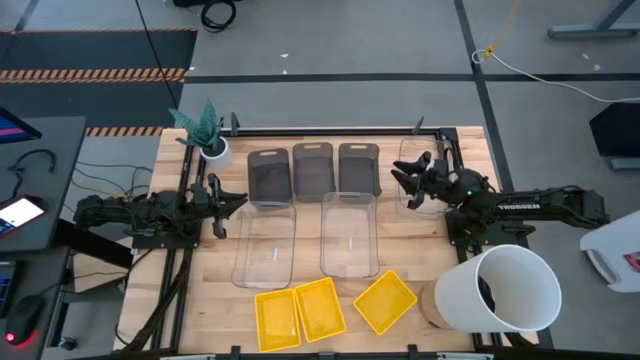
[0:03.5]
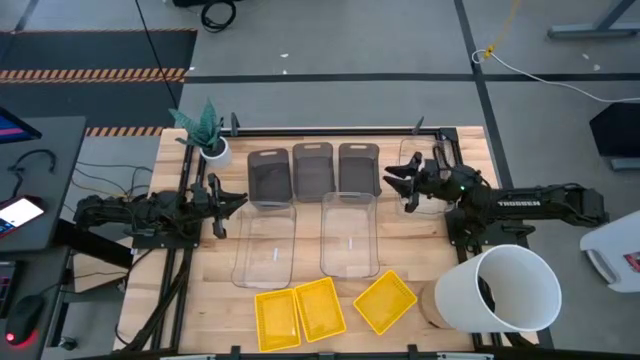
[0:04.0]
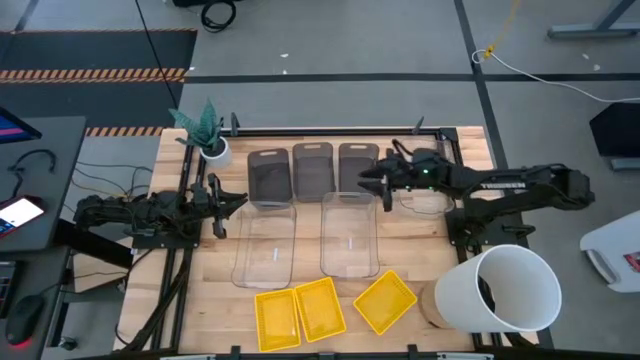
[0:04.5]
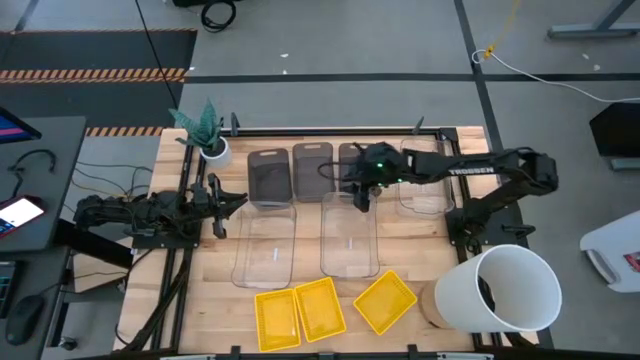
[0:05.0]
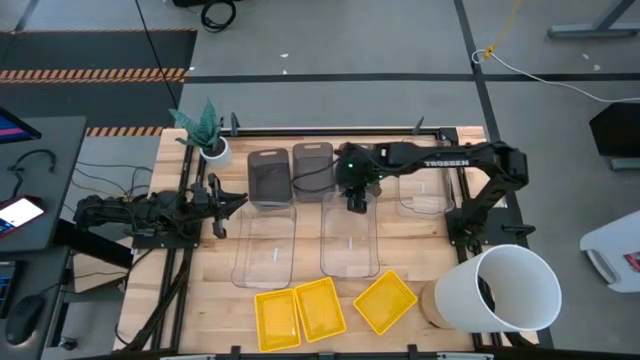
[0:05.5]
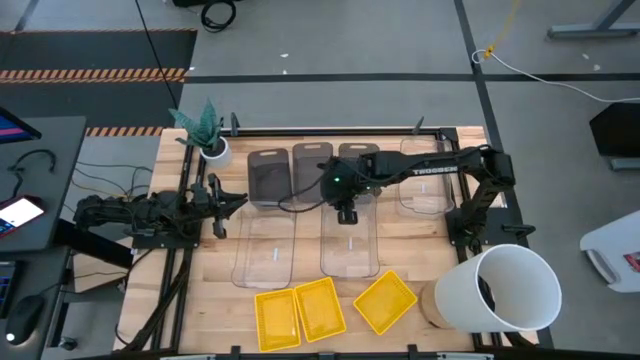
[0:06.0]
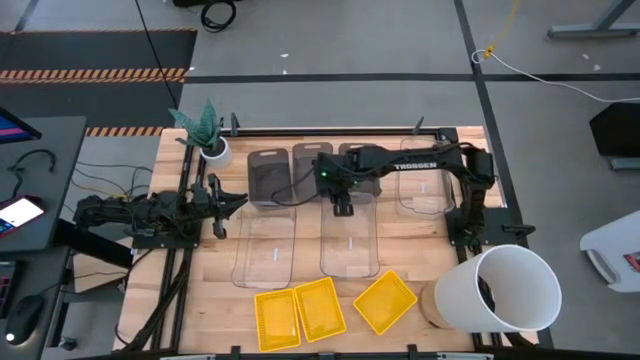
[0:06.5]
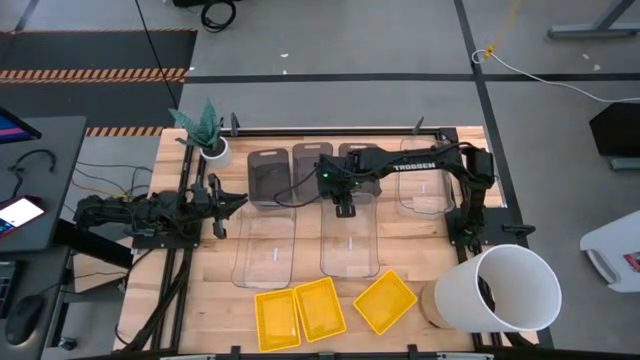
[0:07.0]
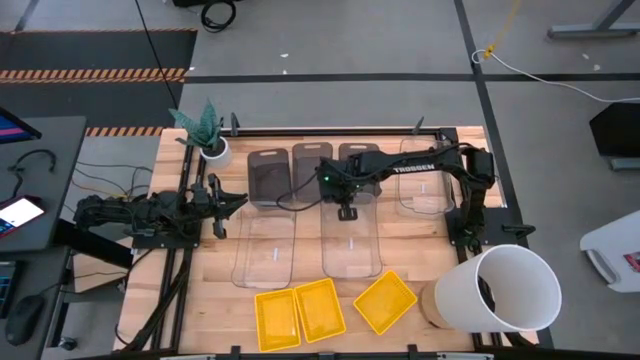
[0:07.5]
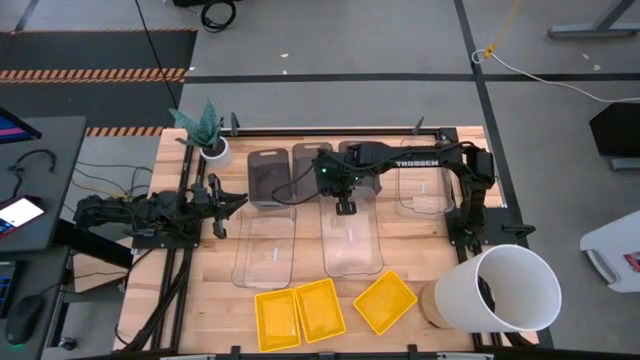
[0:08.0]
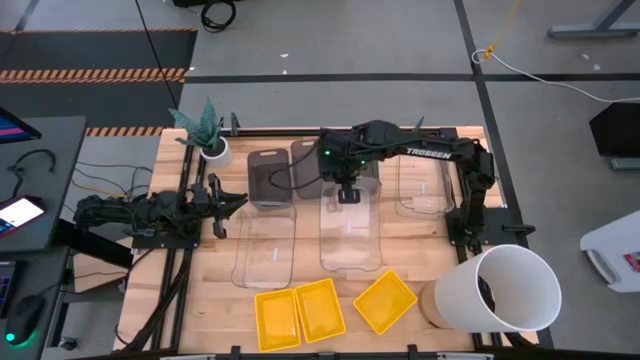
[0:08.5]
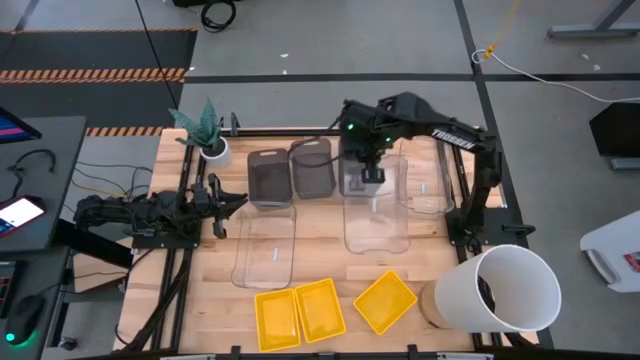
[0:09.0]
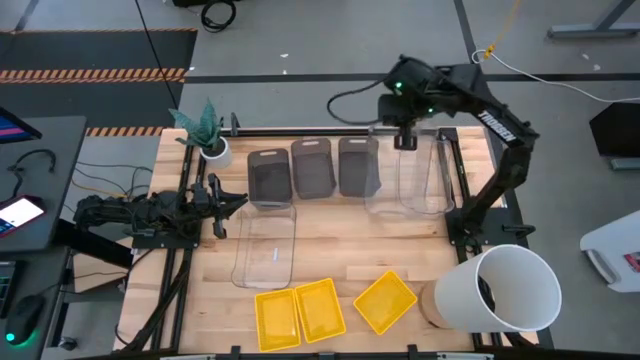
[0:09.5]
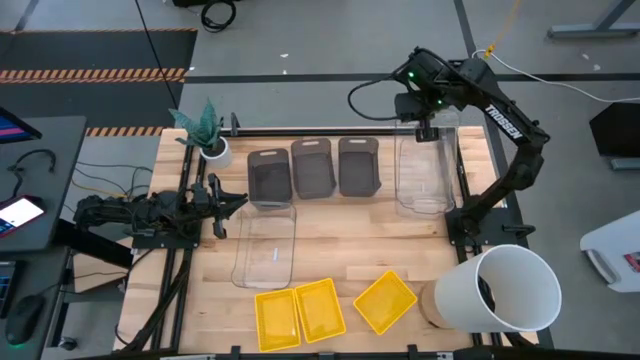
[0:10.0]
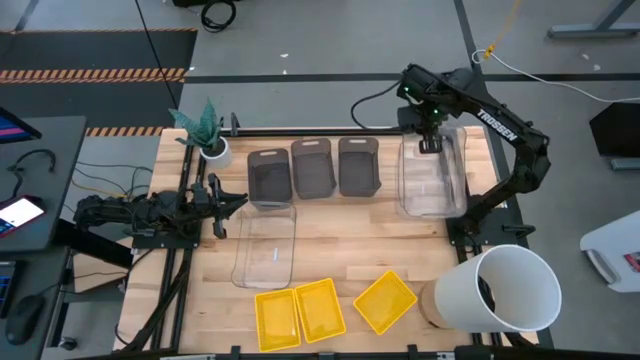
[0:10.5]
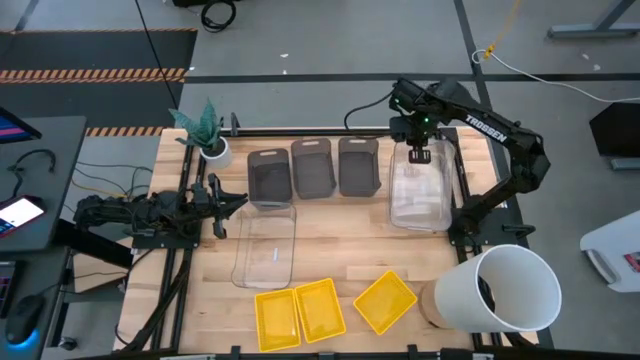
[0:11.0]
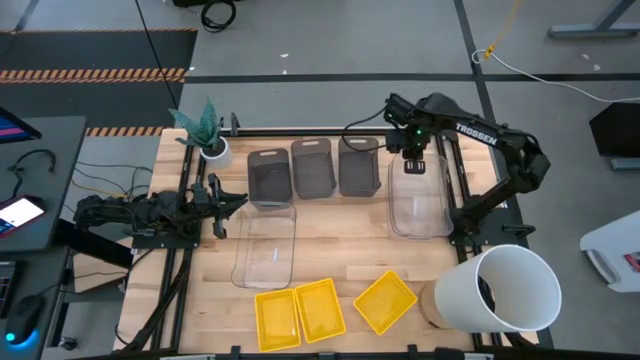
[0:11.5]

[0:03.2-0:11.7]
Stack the middle transparent bin on top of the right transparent bin

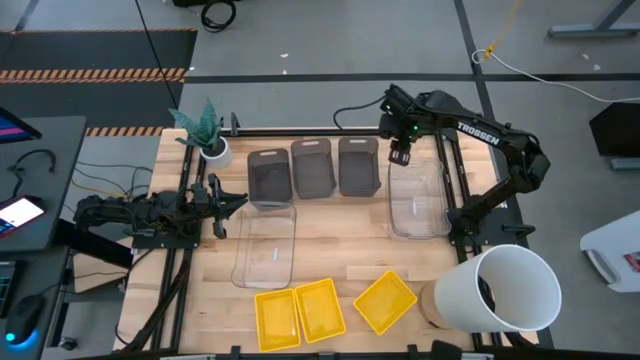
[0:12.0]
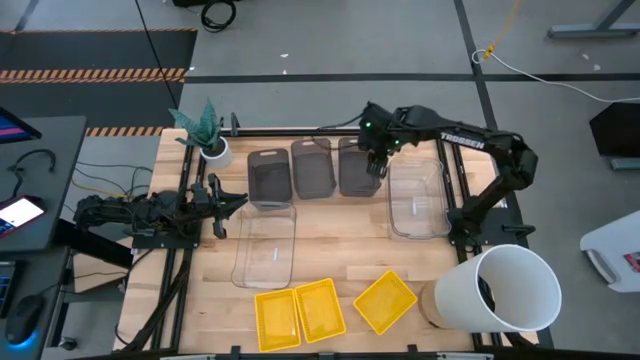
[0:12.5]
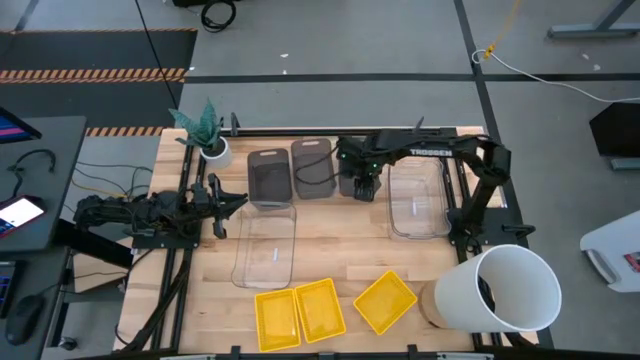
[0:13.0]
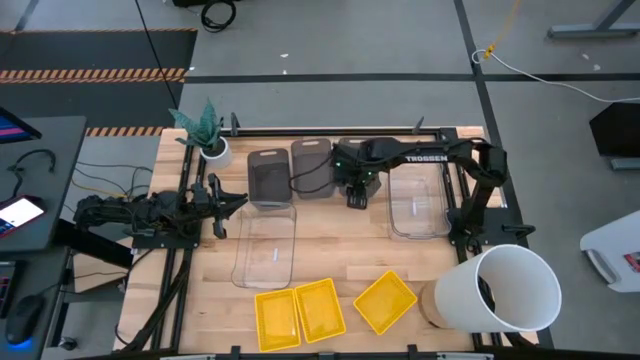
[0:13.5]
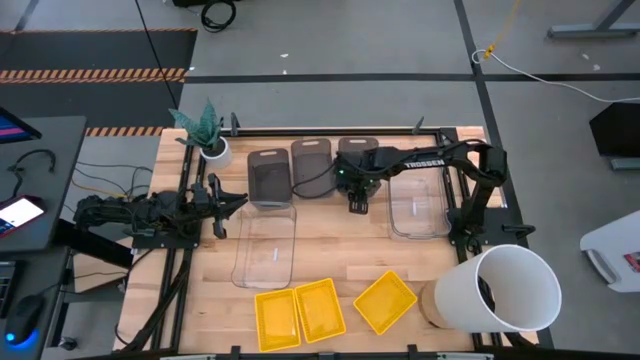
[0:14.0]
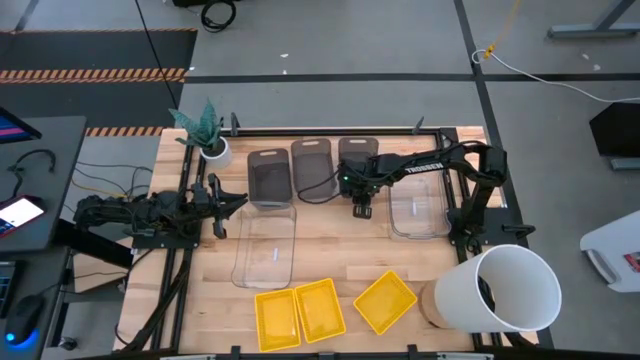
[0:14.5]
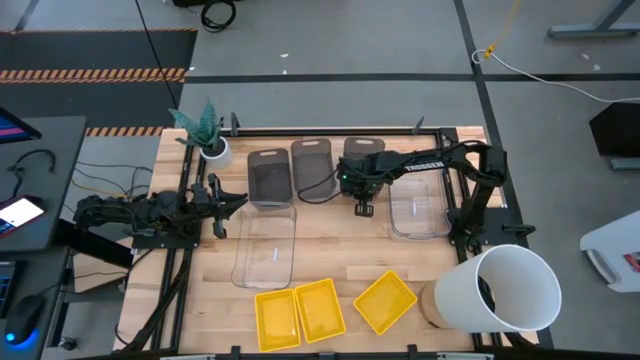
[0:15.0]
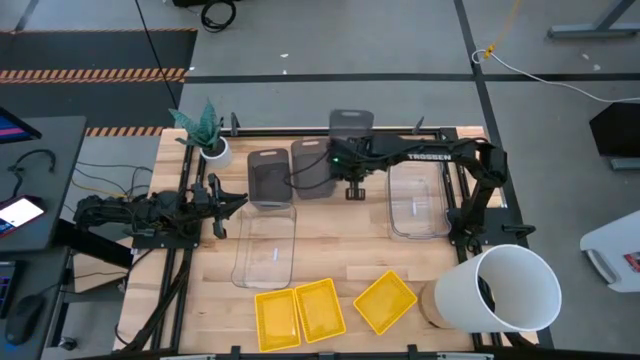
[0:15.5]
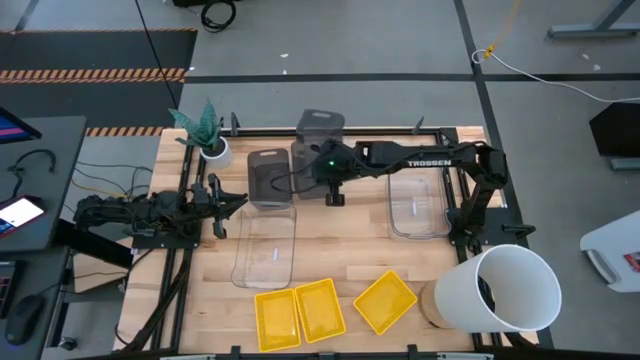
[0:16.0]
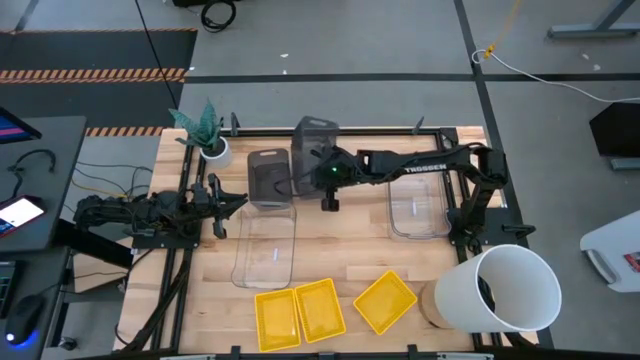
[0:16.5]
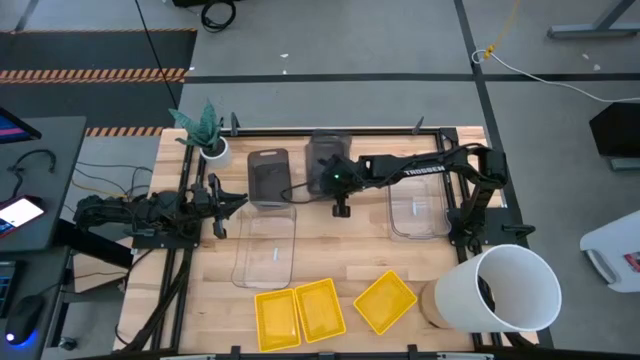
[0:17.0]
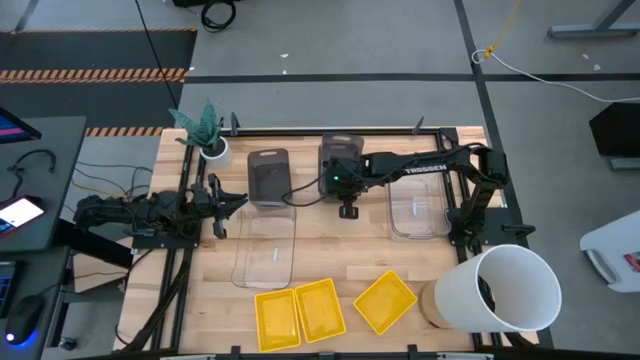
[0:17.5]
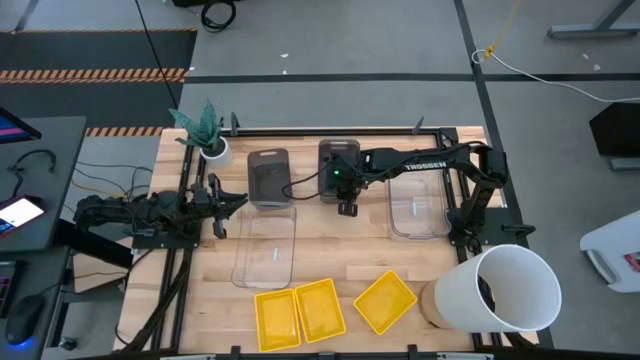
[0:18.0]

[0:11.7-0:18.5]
Stack the right black bin on top of the middle black bin

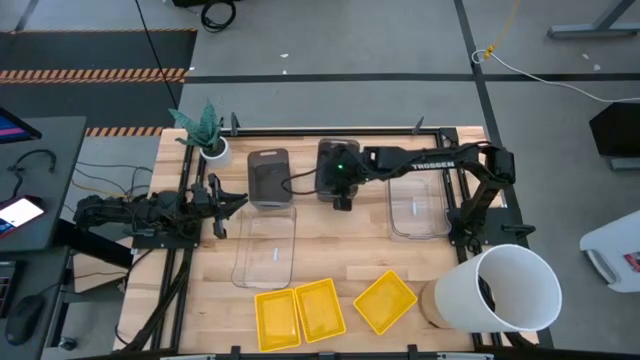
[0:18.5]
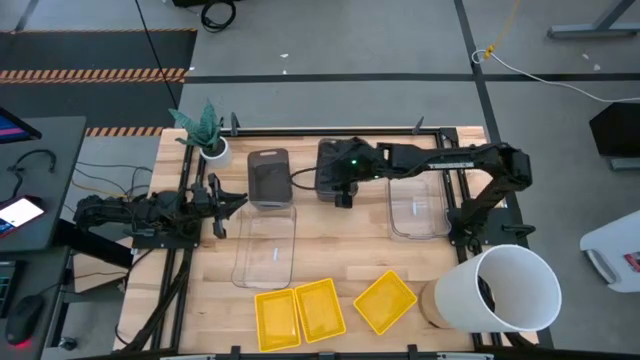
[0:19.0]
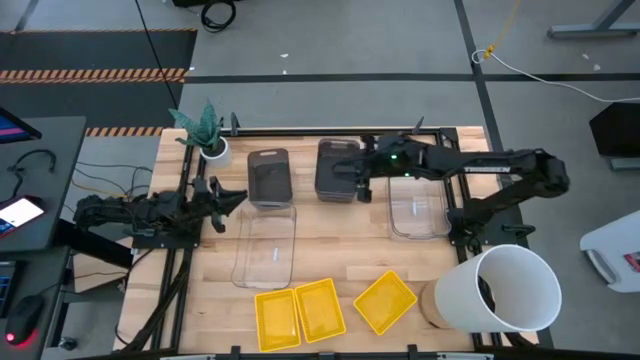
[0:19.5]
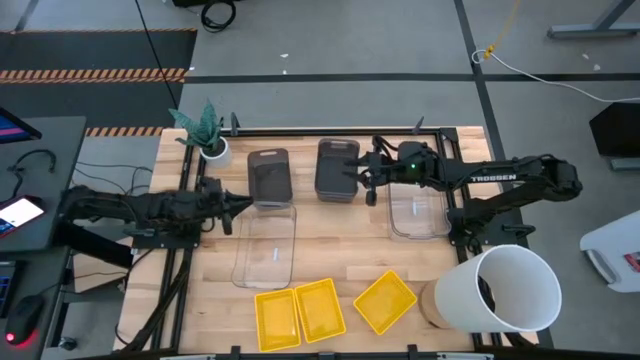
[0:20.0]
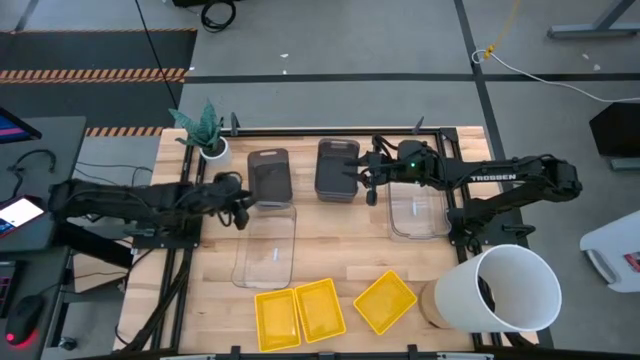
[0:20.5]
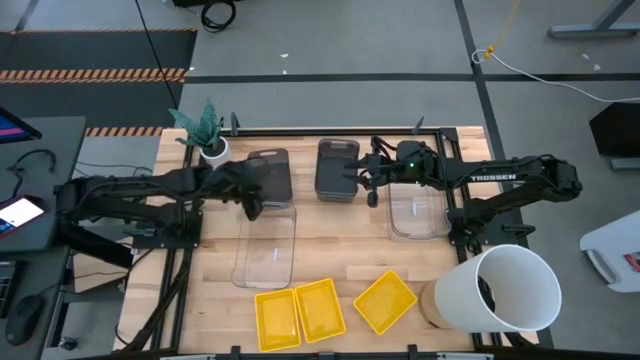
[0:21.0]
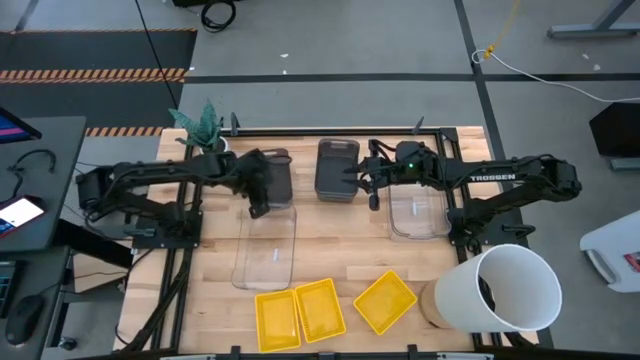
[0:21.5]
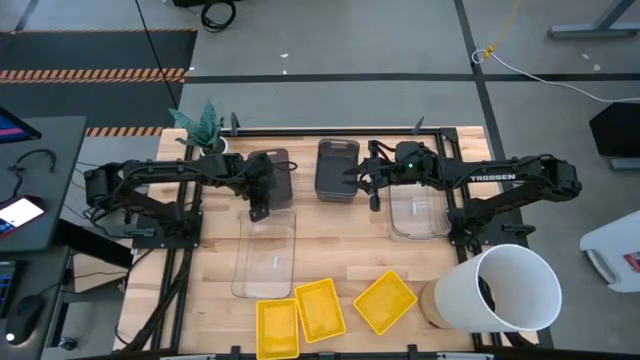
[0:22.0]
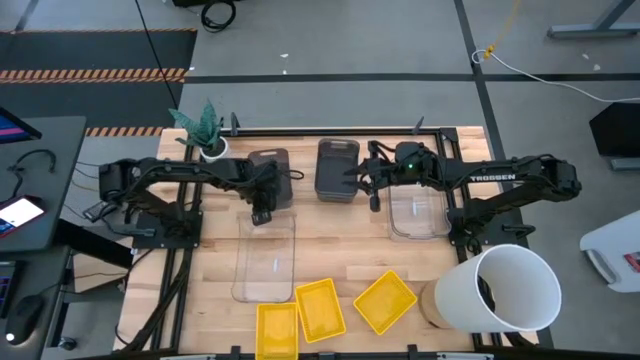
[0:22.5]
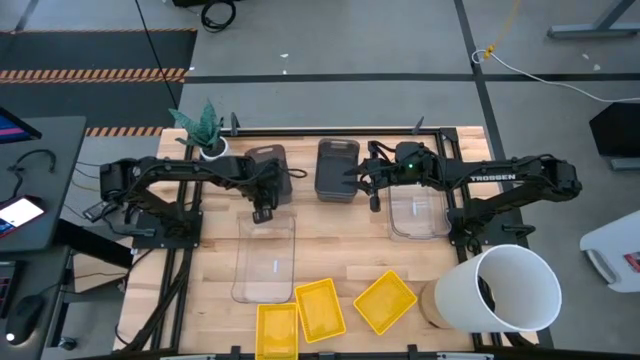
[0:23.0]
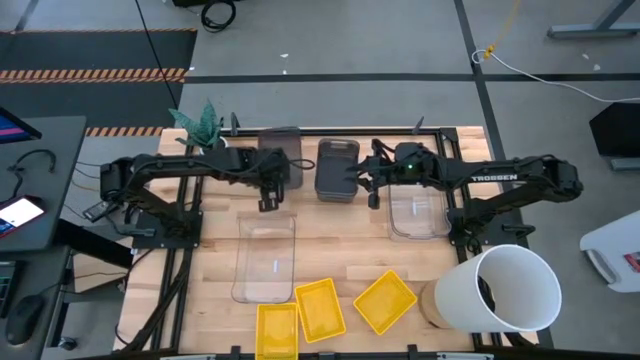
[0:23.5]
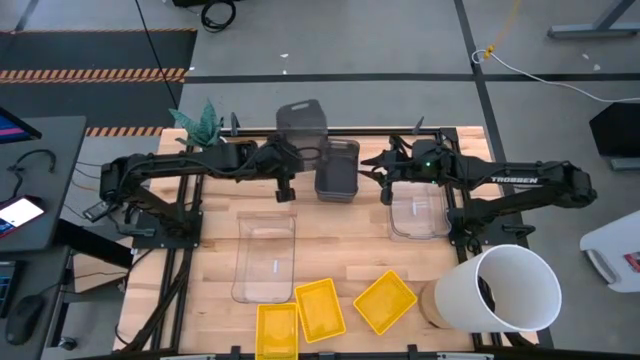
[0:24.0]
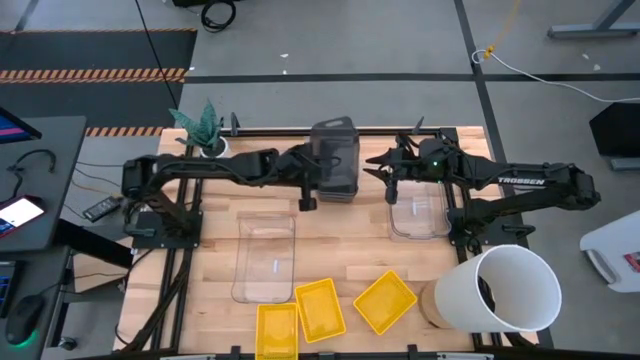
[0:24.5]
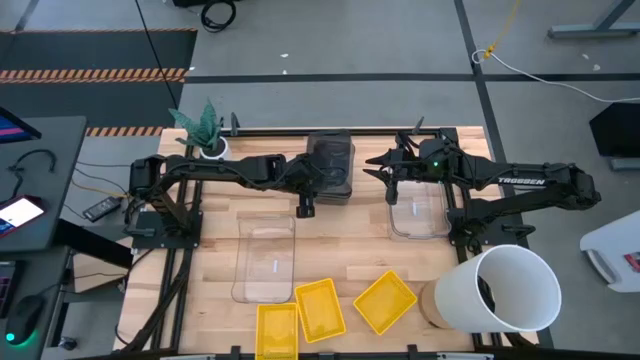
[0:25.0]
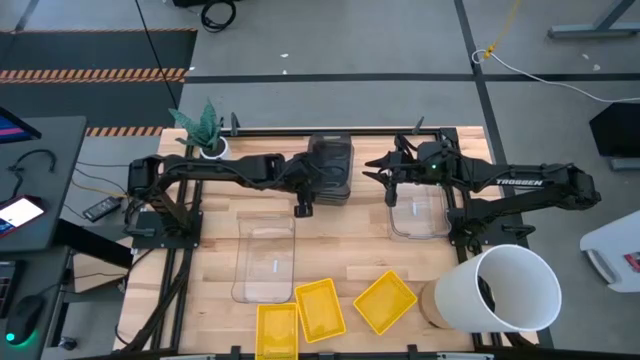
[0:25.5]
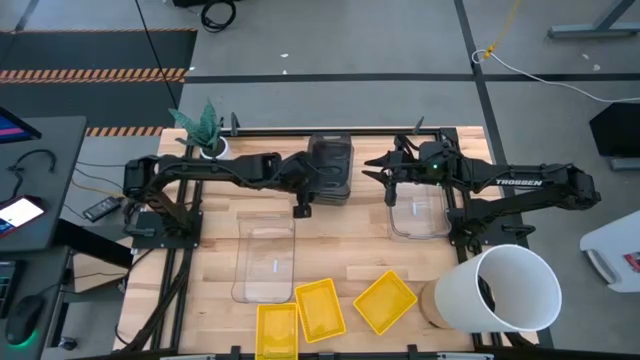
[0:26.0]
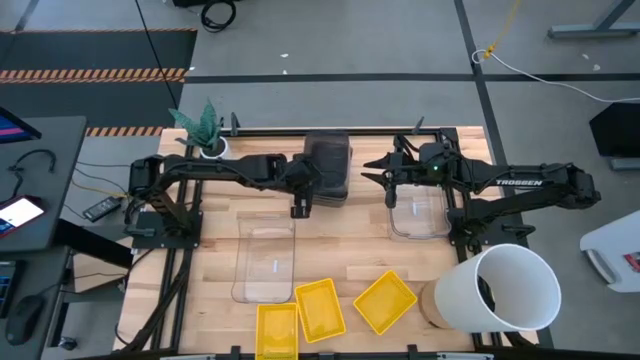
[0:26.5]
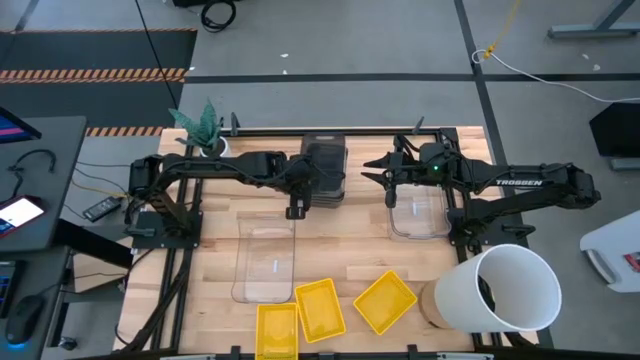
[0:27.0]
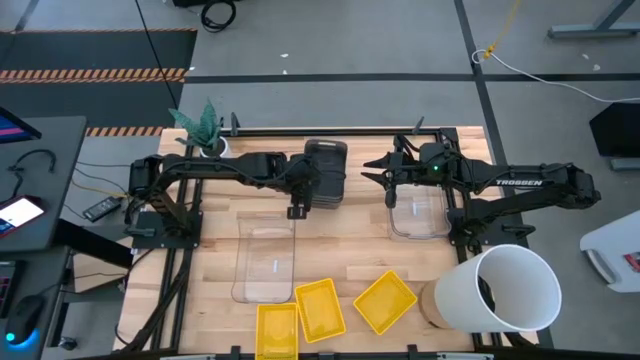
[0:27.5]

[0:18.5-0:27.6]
Stack the black bin on top of the stacked black bins
